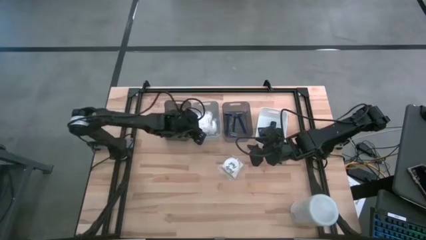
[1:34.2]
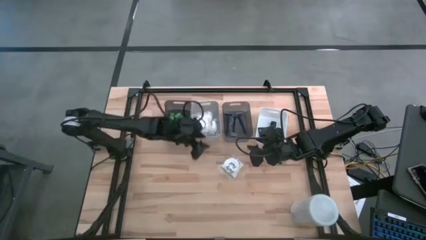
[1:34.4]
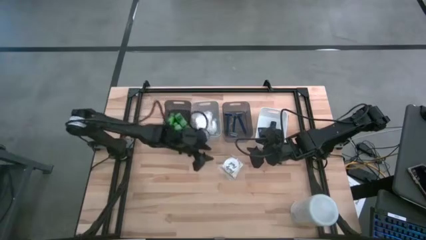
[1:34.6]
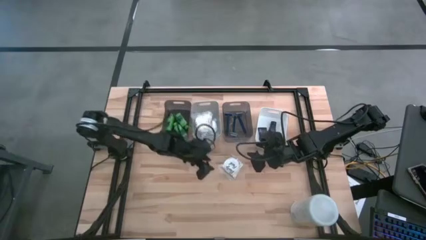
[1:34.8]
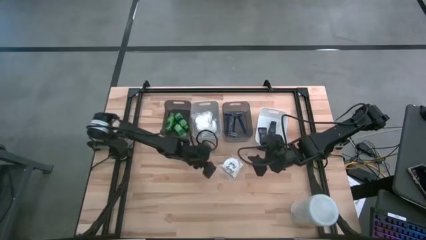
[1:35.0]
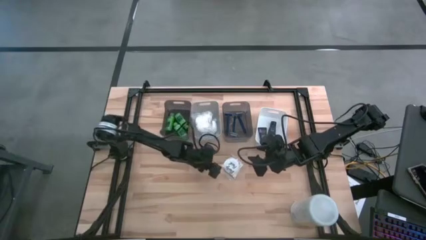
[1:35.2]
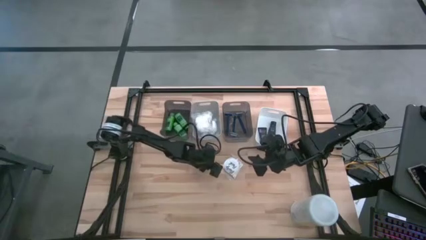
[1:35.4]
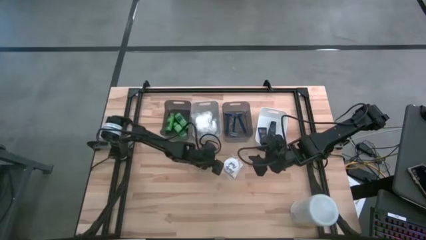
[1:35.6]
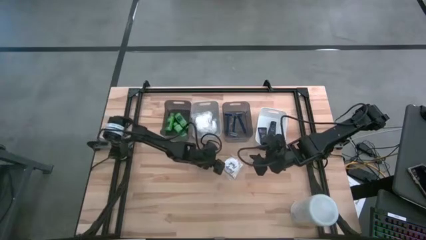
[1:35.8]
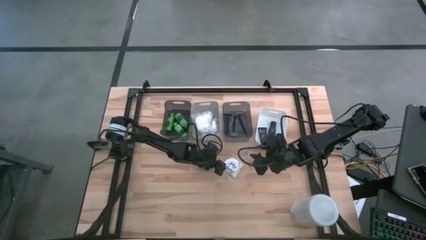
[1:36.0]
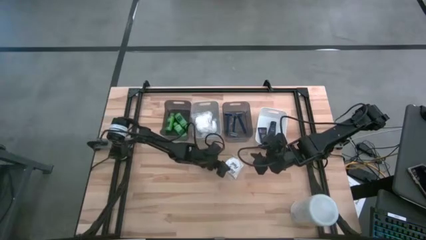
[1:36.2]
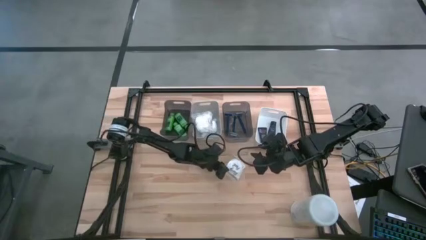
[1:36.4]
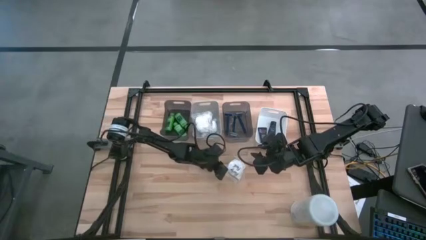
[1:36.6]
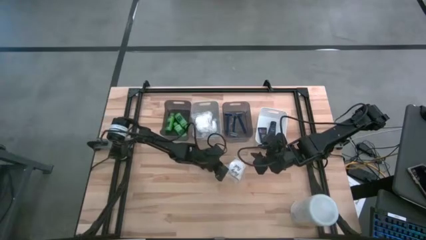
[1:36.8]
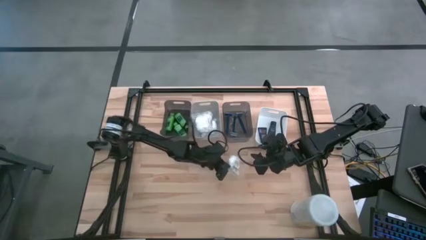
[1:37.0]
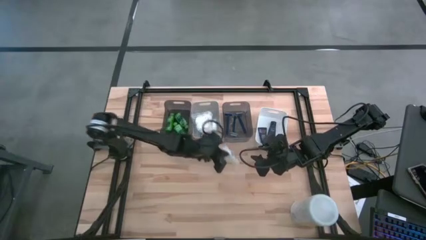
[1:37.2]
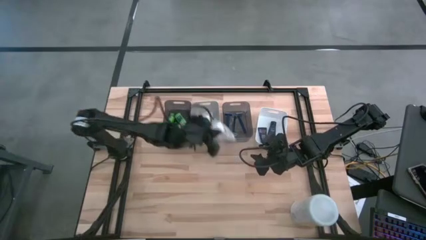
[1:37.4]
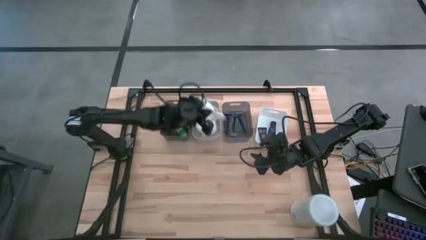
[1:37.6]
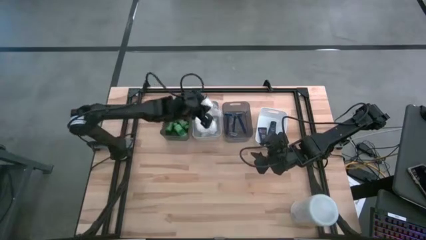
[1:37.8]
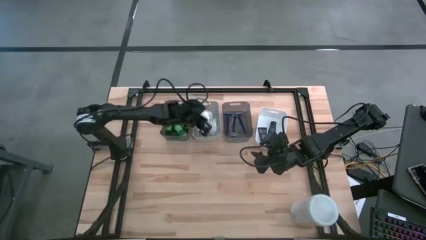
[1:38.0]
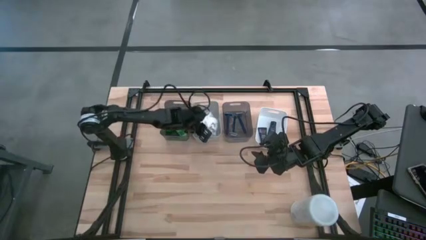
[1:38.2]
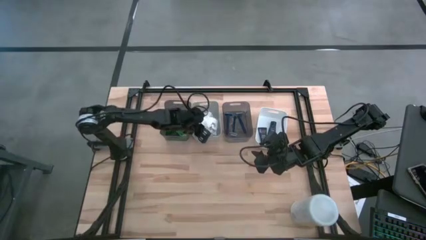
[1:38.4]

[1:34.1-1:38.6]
Task: Pick & Place Travel size toiletries
Put the white cotton pack into the gray bin

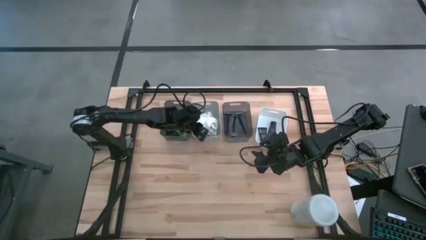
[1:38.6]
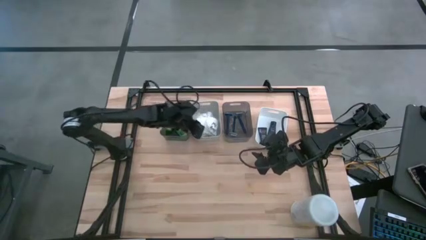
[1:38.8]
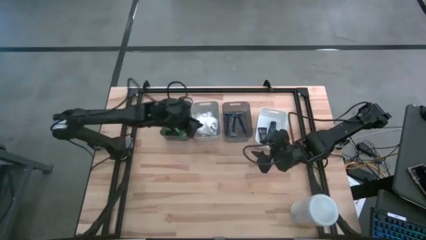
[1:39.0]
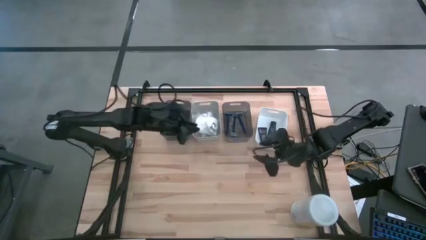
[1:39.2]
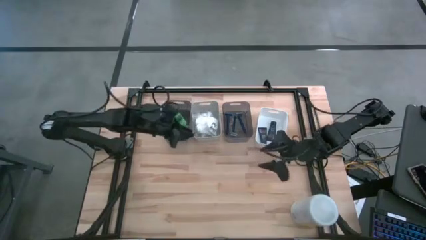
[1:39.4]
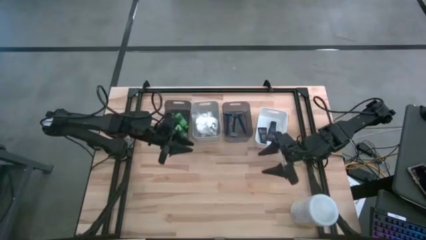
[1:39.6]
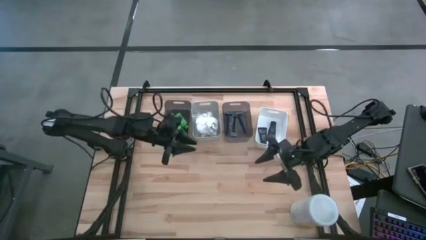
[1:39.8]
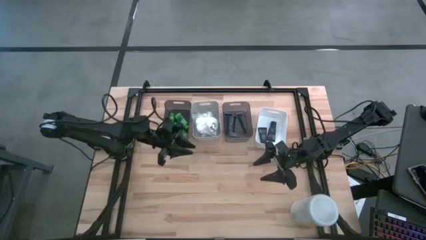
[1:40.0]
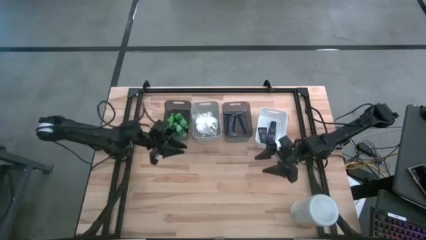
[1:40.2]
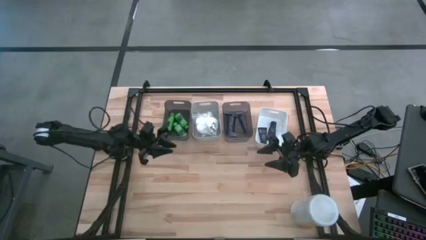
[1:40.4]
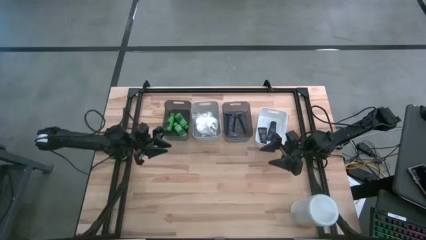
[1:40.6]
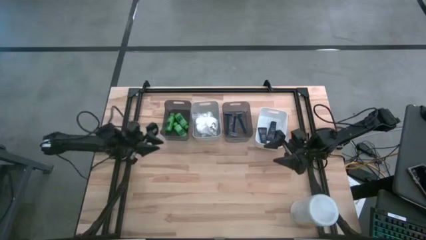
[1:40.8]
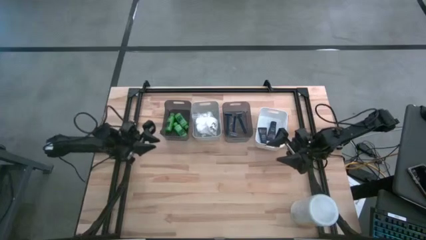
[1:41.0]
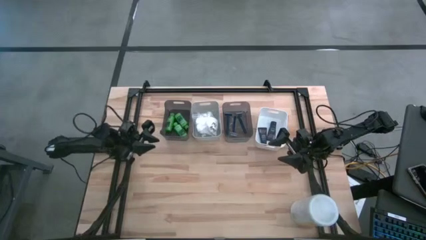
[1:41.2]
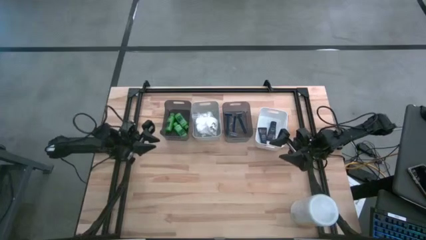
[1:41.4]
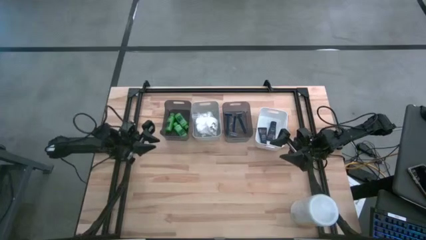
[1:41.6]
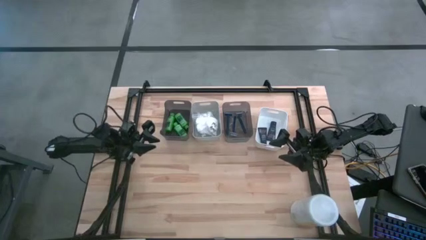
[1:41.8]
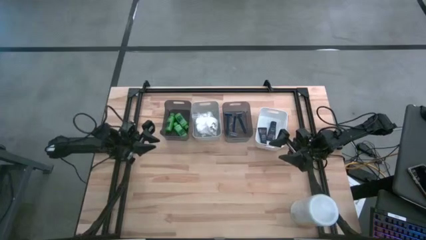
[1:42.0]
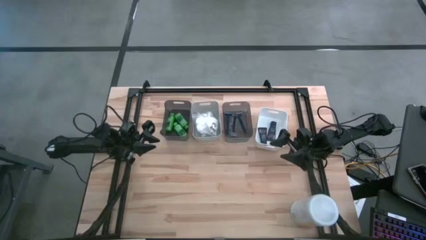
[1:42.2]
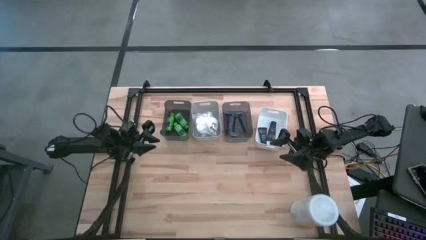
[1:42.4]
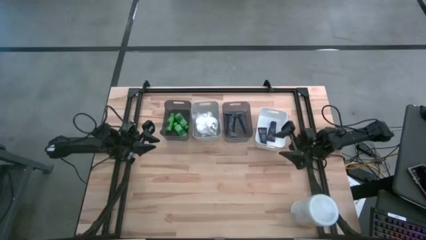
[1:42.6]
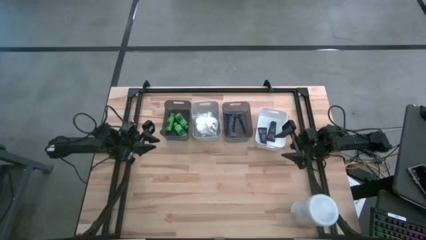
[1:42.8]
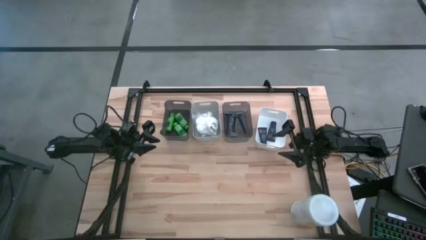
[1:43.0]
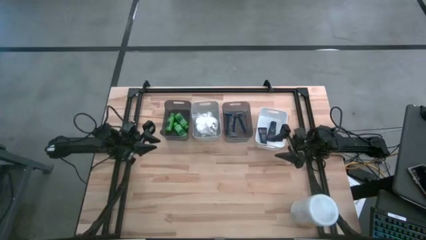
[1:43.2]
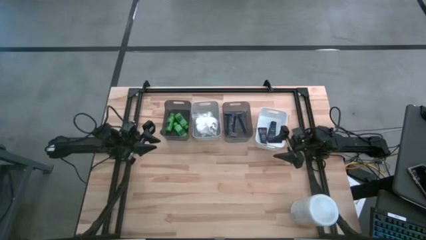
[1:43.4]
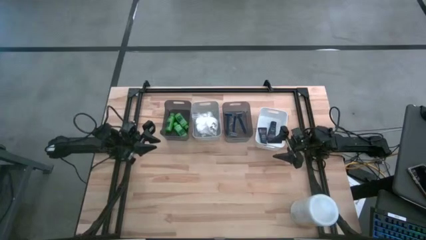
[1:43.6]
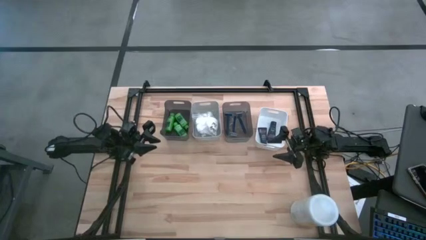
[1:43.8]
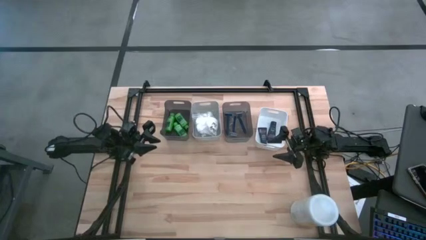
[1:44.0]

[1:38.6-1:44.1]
Return to Home Position
